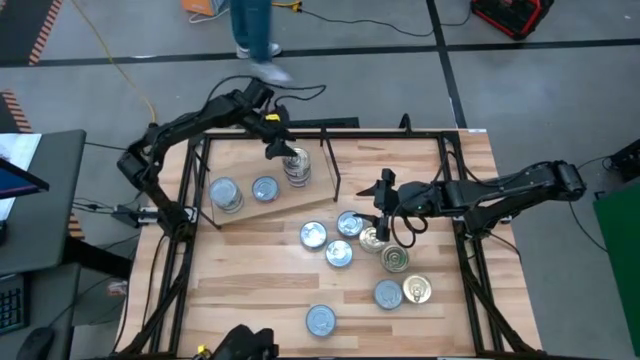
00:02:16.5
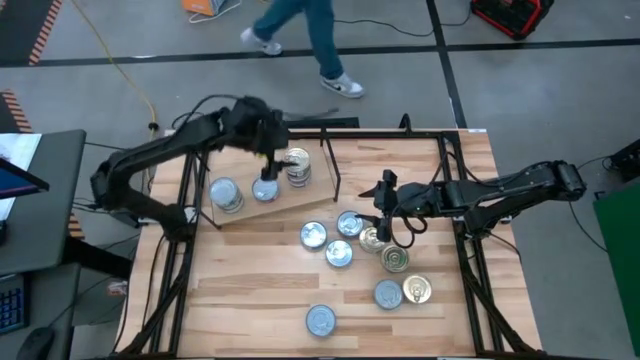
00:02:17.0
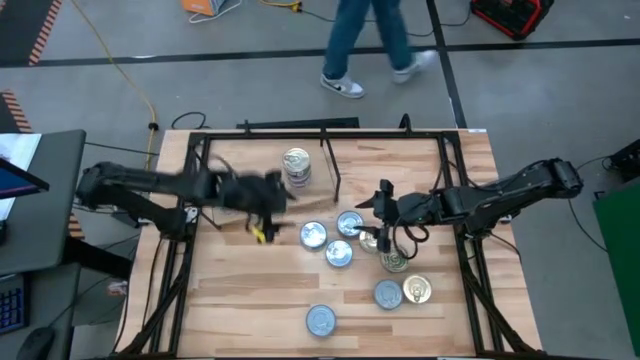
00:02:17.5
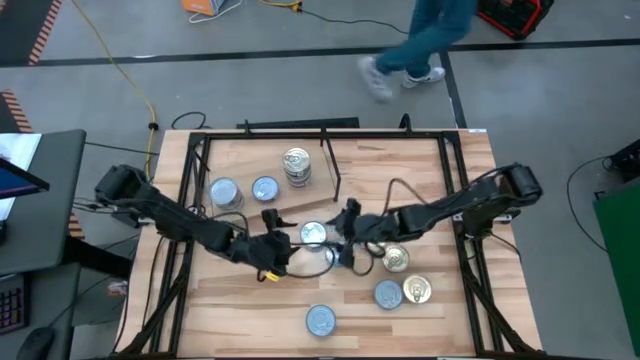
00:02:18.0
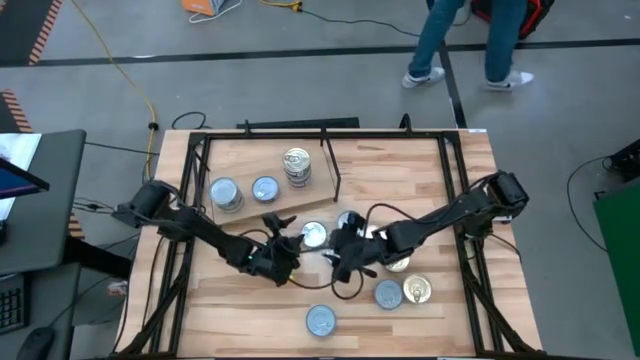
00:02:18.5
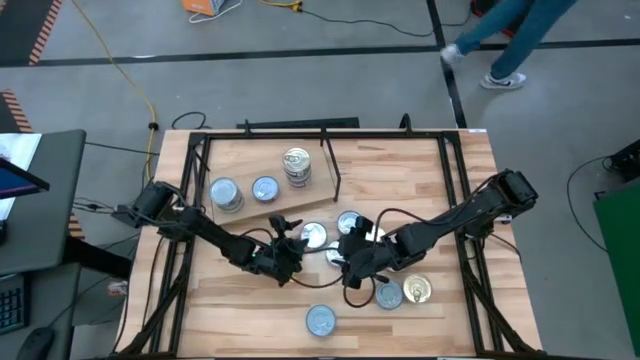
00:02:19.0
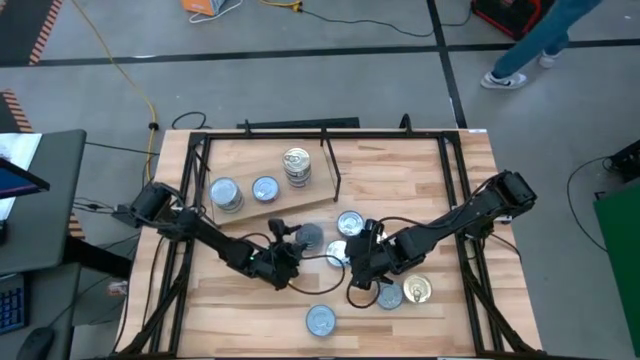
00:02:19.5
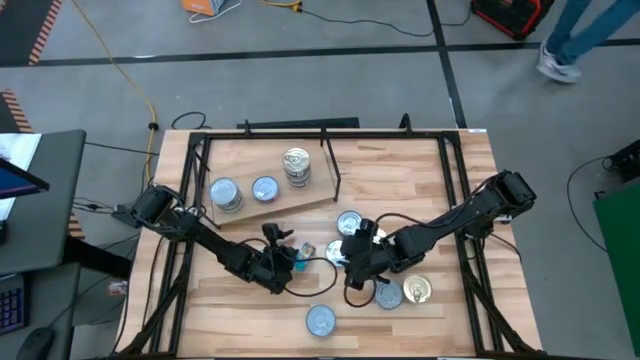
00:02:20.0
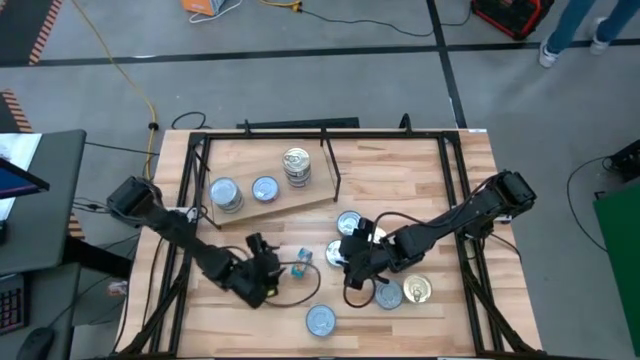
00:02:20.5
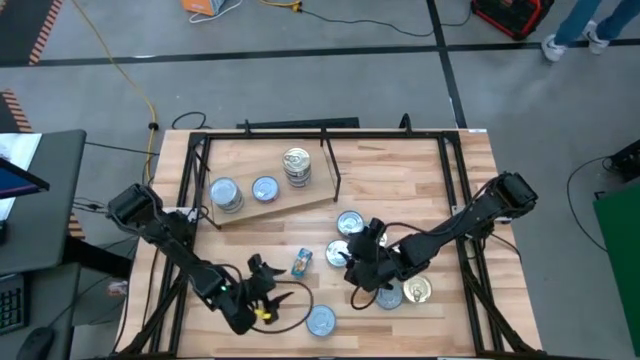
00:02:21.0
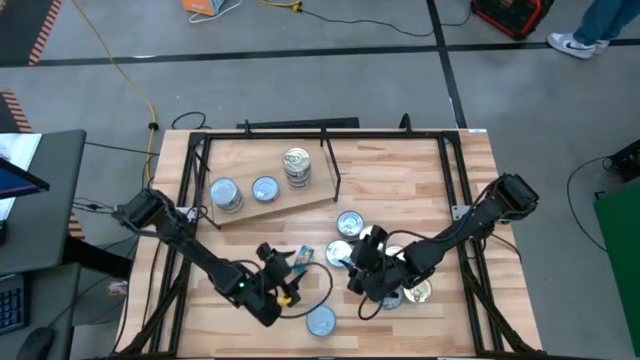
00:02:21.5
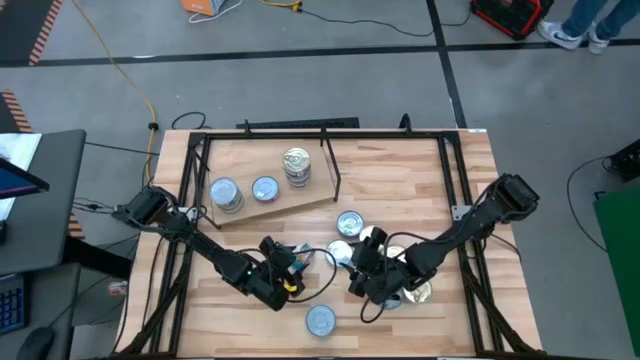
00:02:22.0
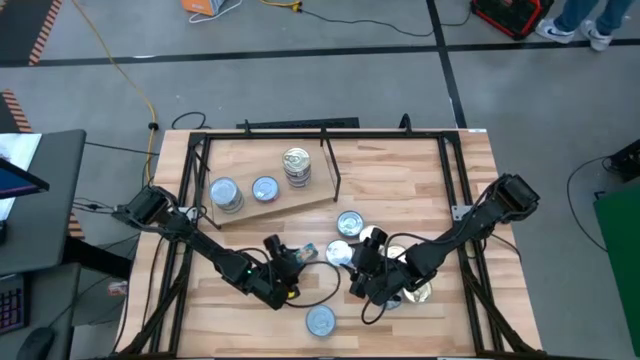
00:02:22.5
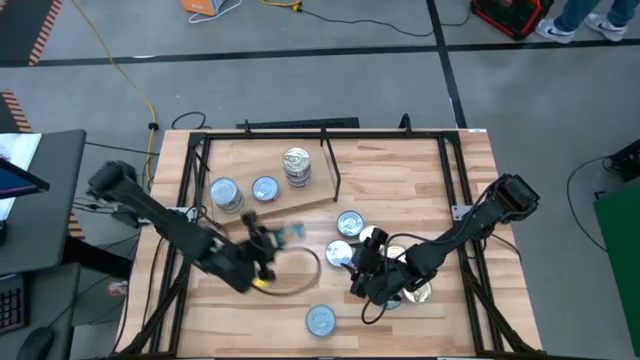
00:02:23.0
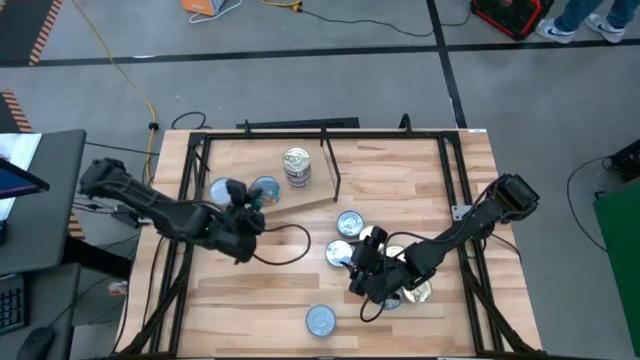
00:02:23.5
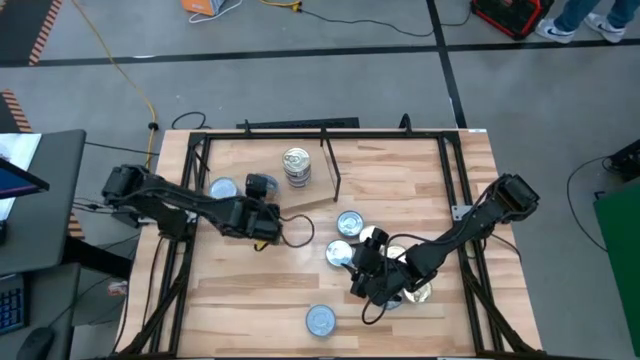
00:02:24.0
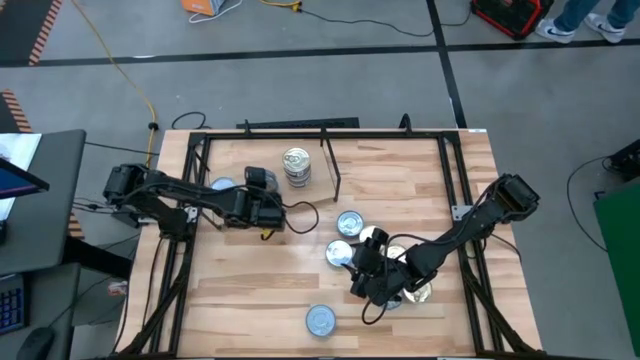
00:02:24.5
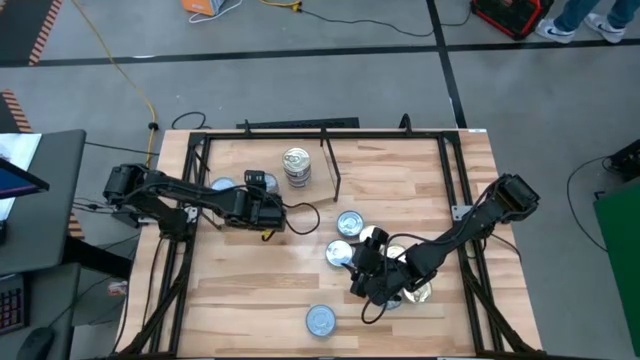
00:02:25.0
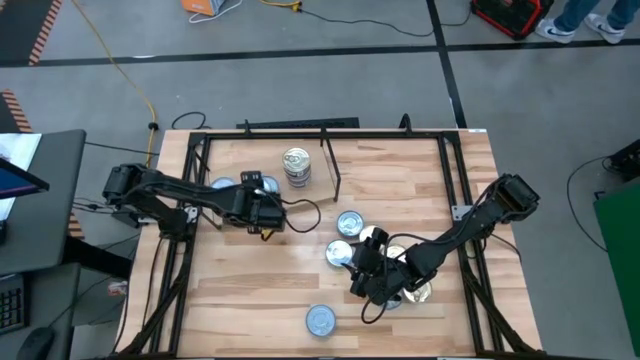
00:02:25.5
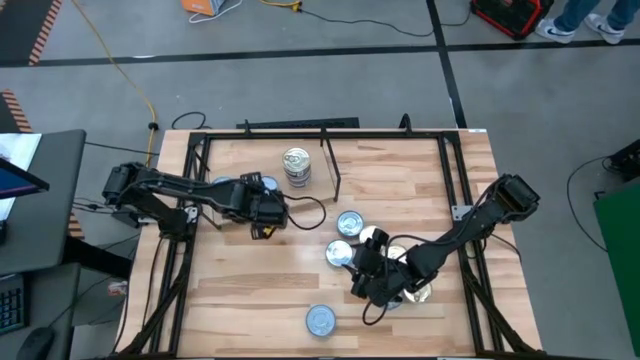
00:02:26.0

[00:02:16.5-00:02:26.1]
Task: Stack canned seafood by type on shelf
Stack the yellow blue tuna can on top of the red tuna can on the shelf

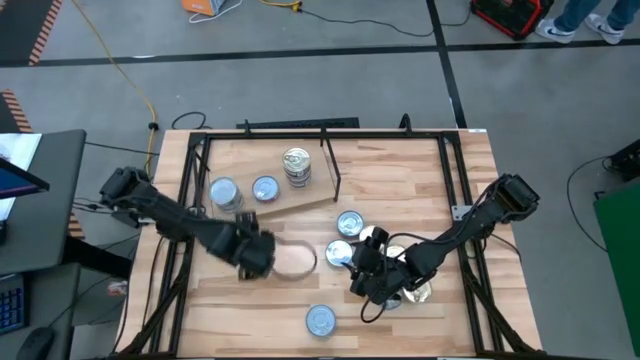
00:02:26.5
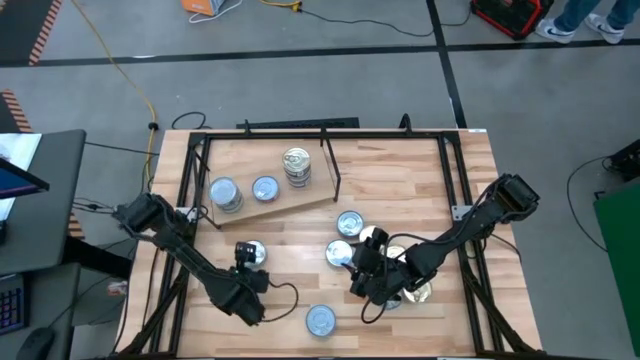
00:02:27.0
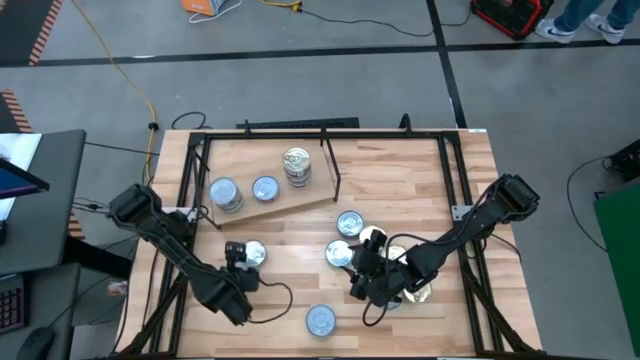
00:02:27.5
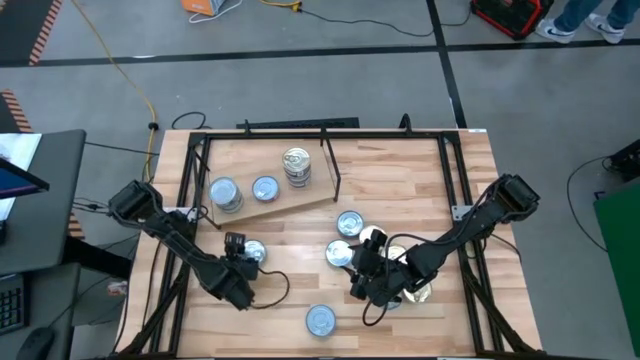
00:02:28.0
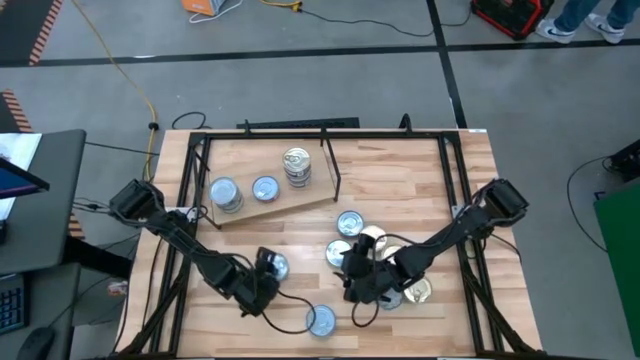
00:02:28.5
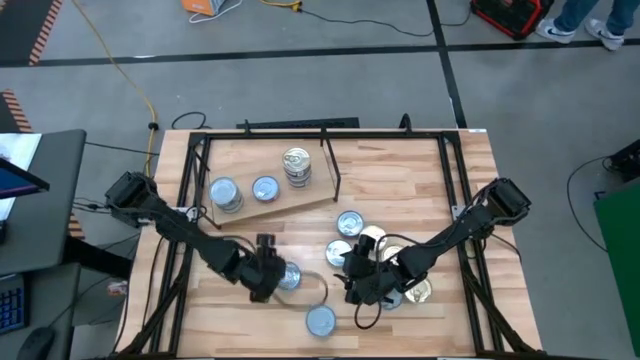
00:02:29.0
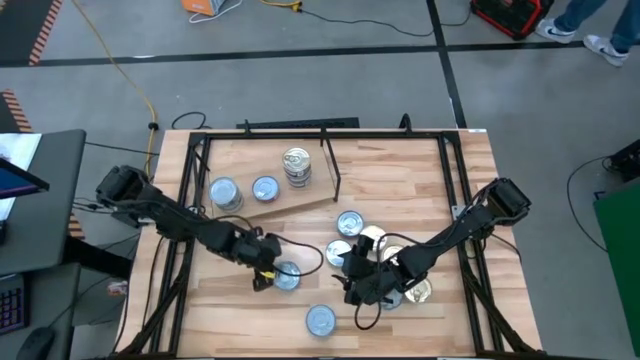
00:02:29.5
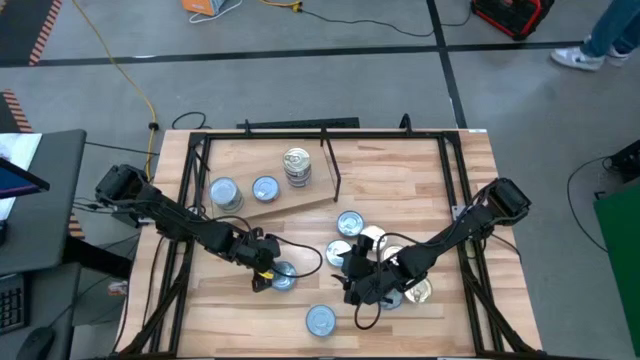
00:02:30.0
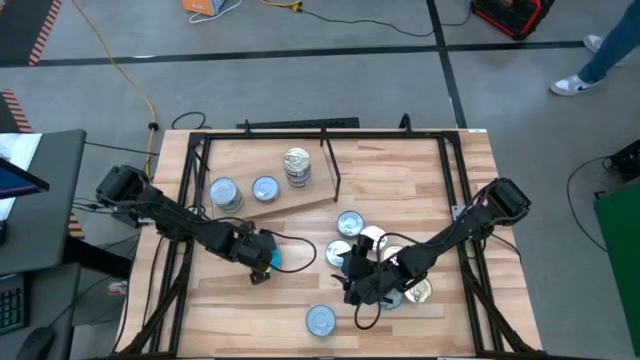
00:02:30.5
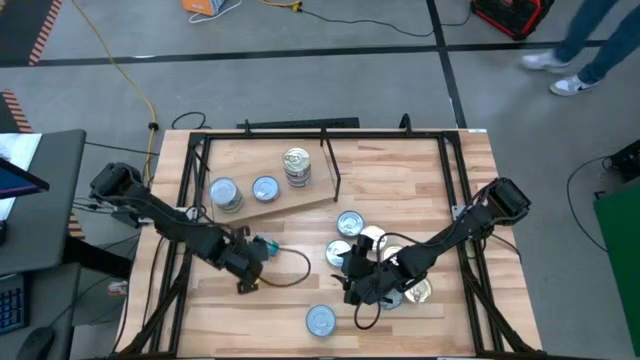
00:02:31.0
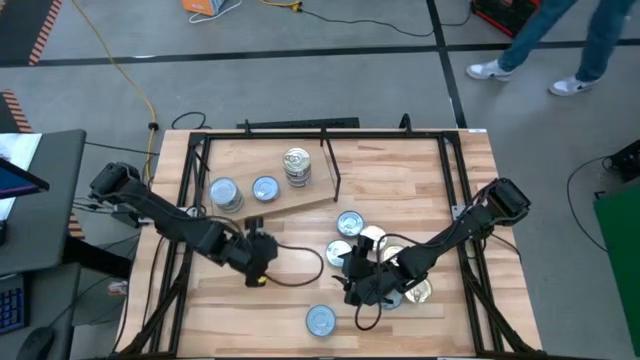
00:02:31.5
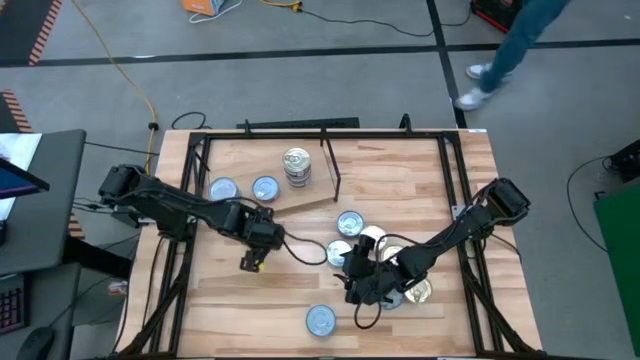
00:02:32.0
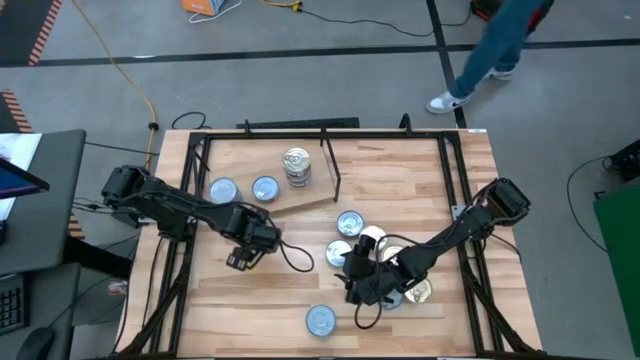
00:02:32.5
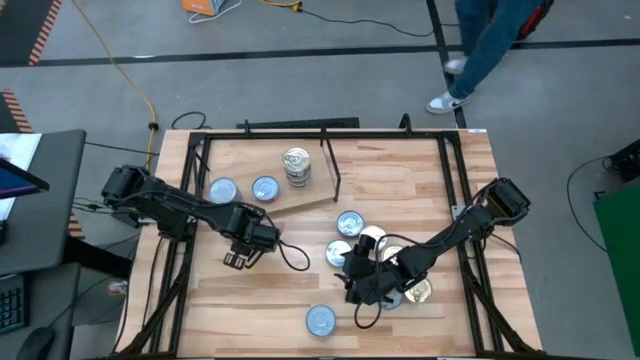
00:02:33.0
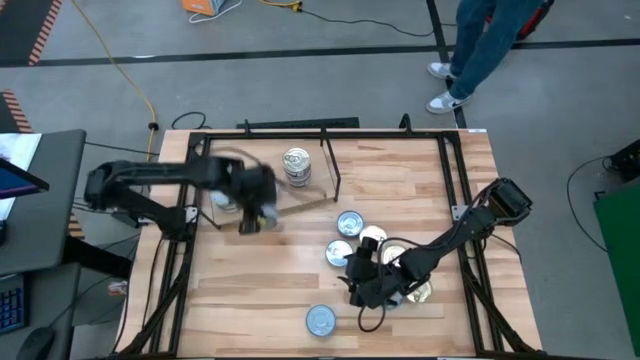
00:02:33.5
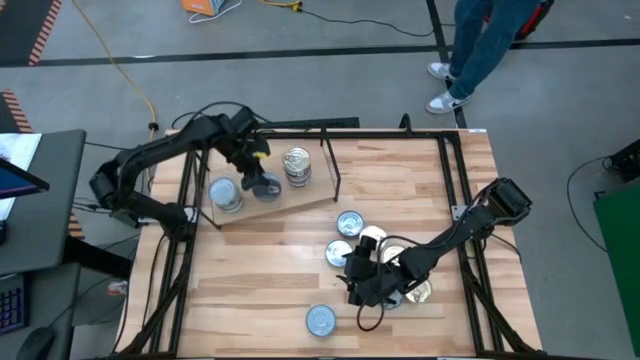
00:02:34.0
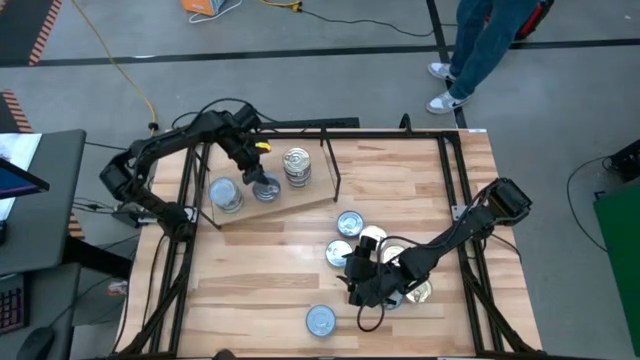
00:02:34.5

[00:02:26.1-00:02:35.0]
Stack the yellow blue tuna can on top of the red tuna can on the shelf

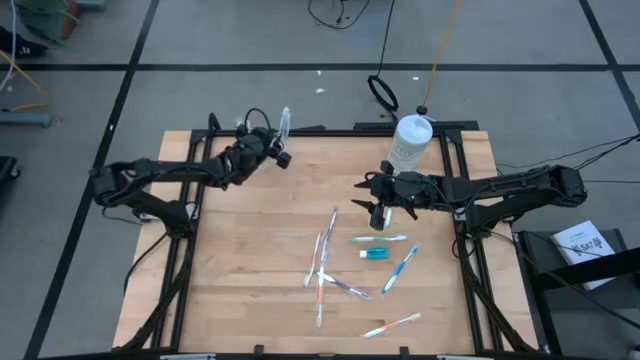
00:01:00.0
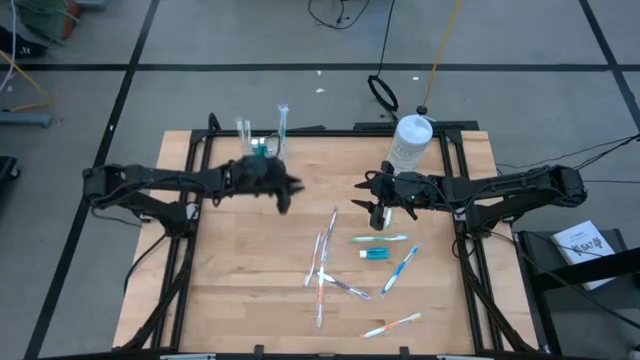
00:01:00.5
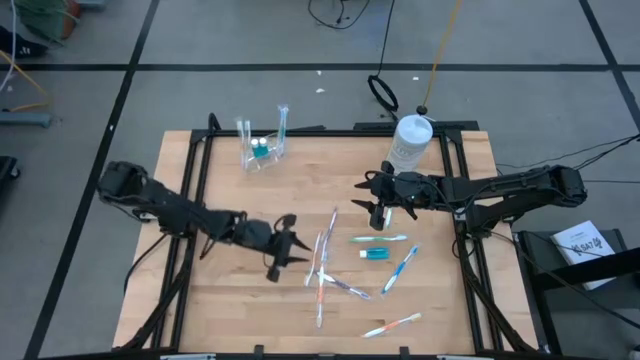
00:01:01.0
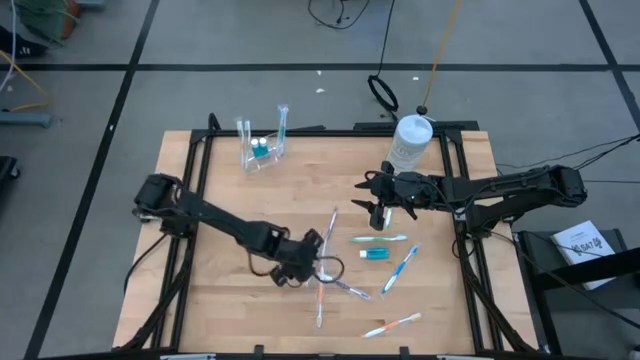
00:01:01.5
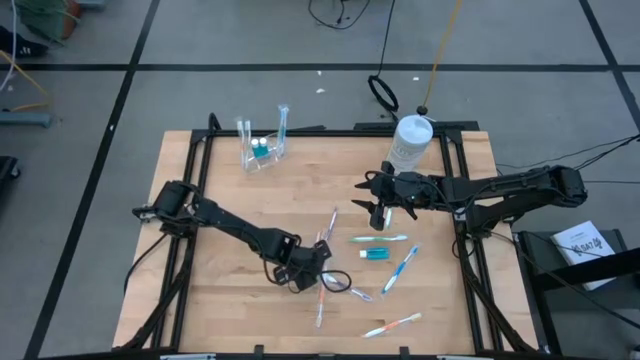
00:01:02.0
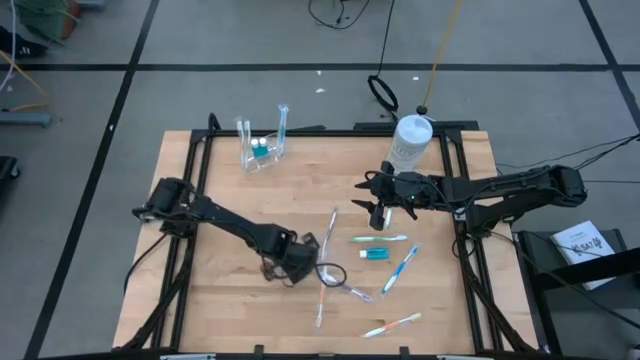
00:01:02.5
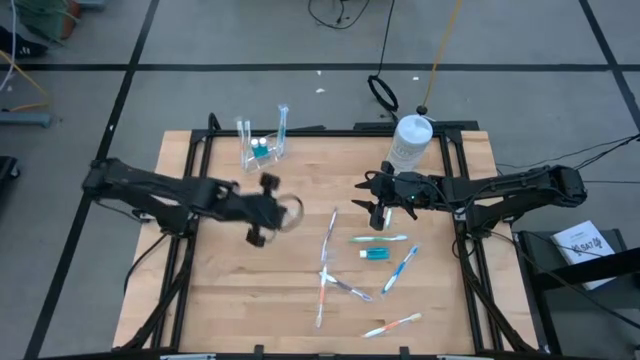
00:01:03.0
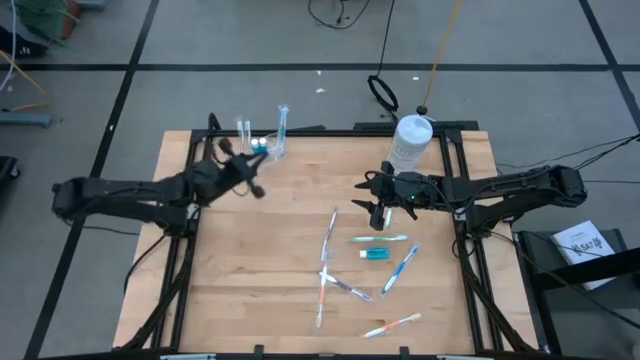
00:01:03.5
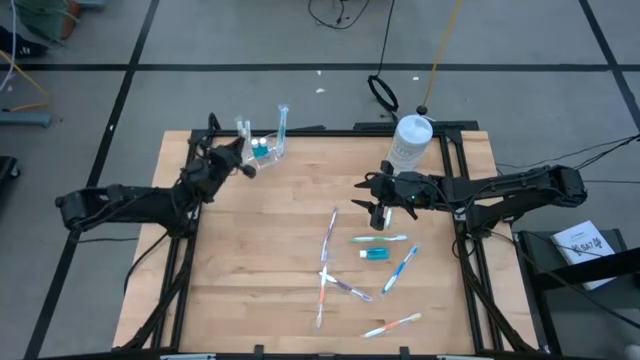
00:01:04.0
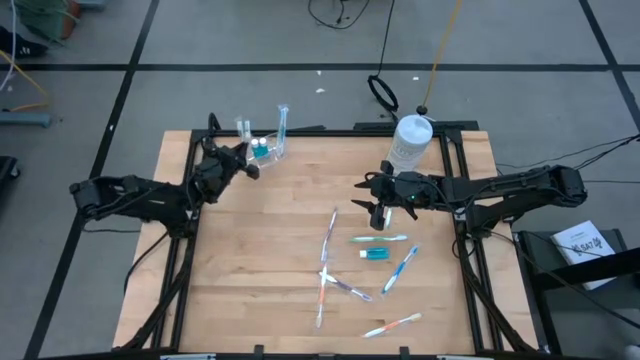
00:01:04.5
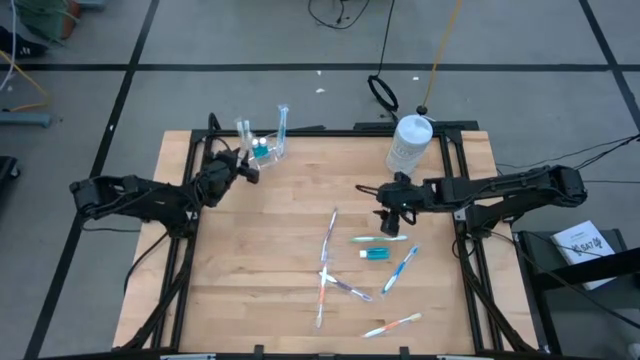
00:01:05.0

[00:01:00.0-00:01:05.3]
Task: Pick & Place toothbrushing station
Put the orange toothbrush into the transparent organizer
